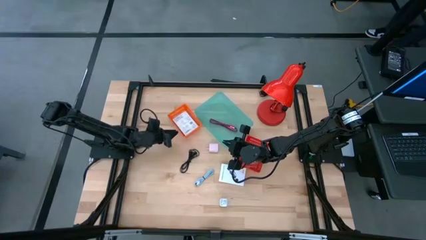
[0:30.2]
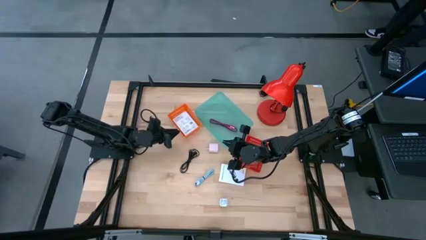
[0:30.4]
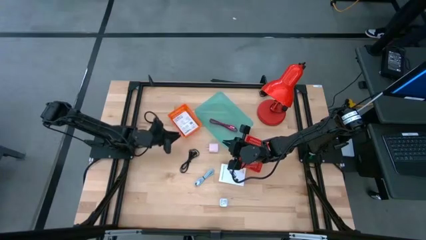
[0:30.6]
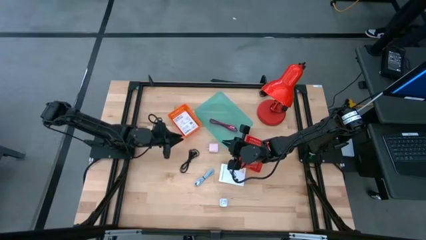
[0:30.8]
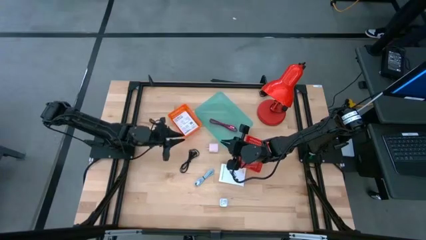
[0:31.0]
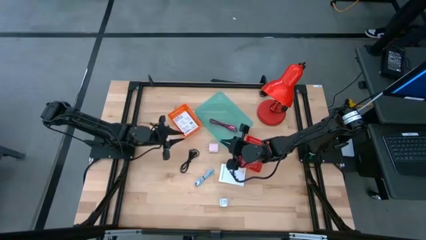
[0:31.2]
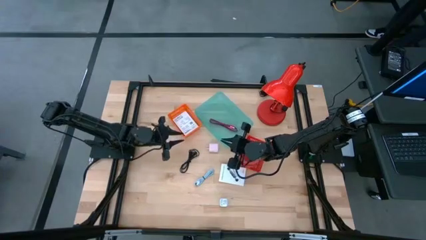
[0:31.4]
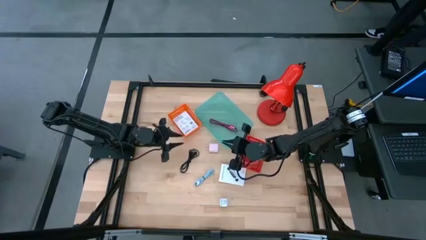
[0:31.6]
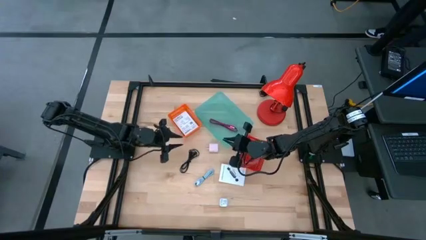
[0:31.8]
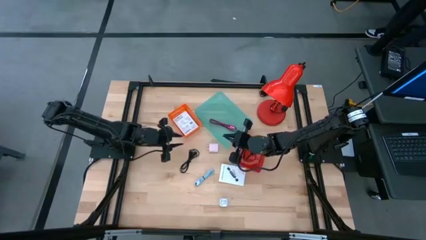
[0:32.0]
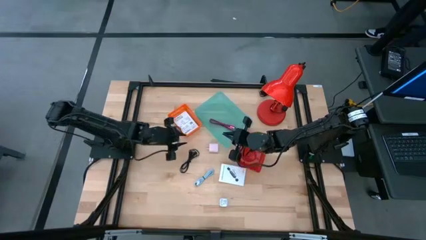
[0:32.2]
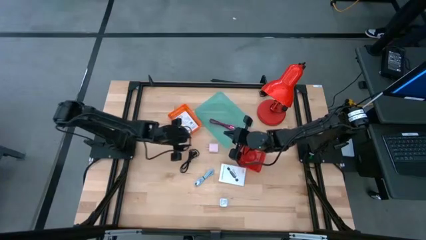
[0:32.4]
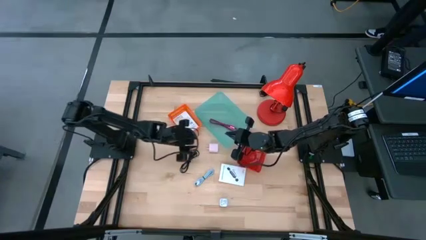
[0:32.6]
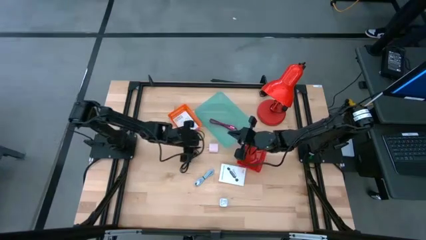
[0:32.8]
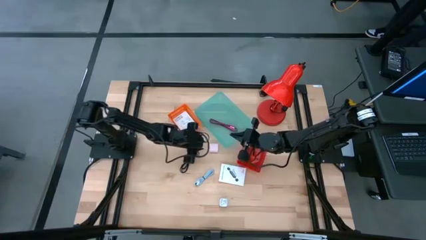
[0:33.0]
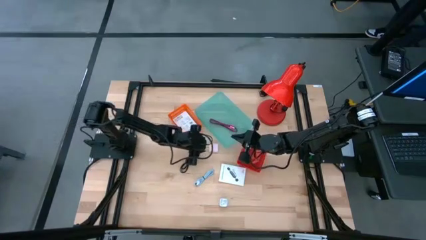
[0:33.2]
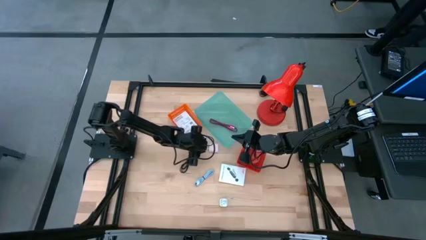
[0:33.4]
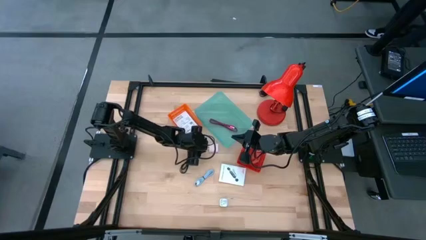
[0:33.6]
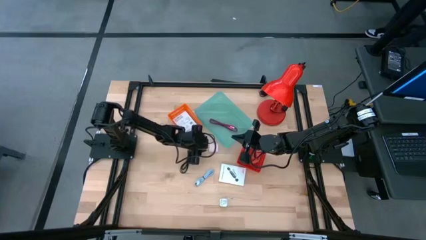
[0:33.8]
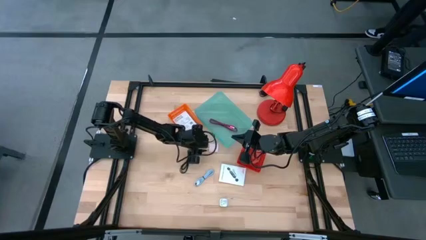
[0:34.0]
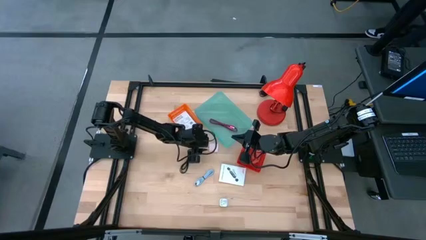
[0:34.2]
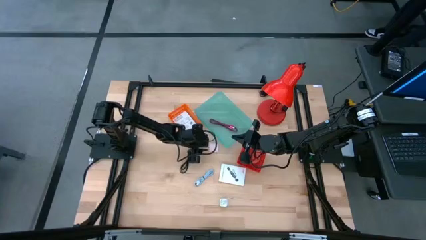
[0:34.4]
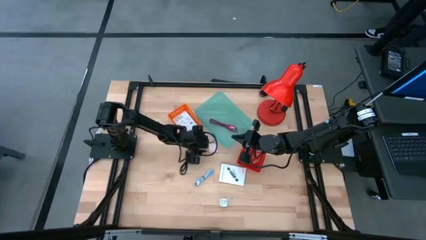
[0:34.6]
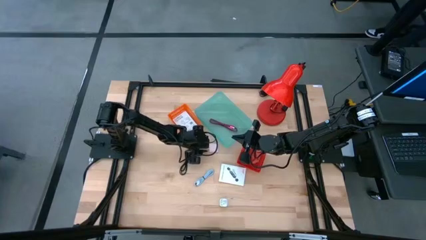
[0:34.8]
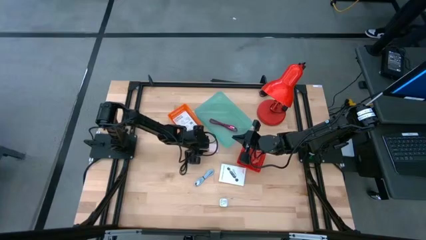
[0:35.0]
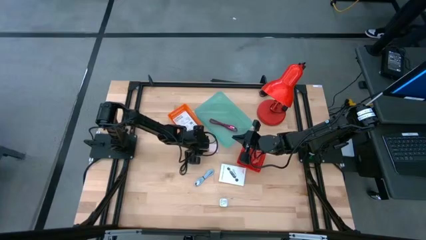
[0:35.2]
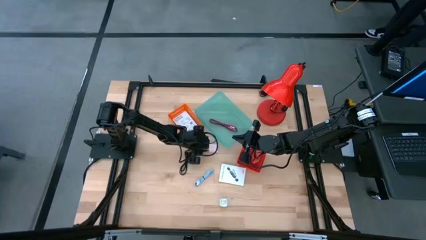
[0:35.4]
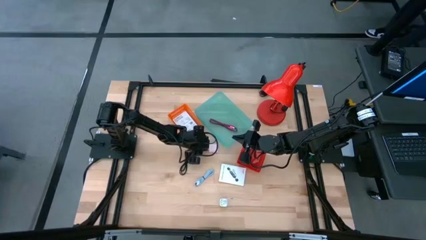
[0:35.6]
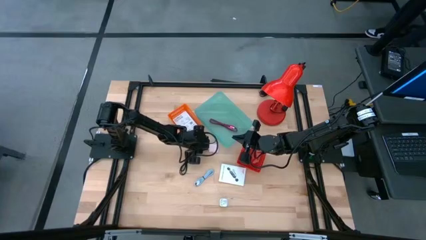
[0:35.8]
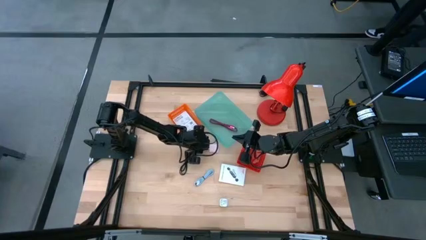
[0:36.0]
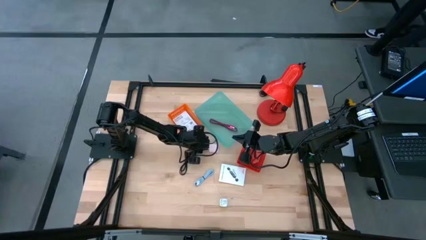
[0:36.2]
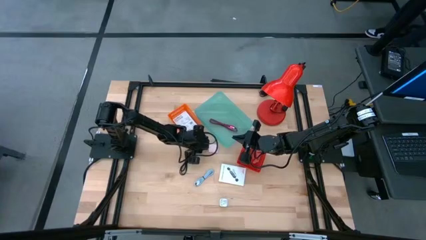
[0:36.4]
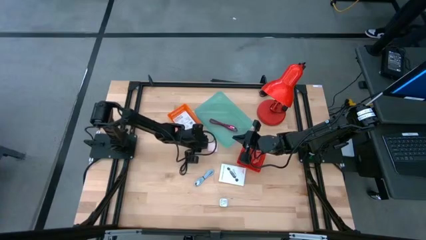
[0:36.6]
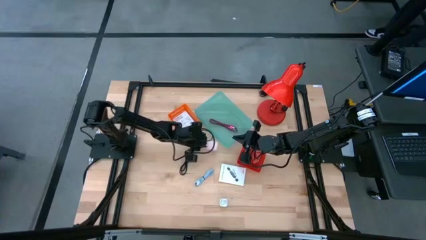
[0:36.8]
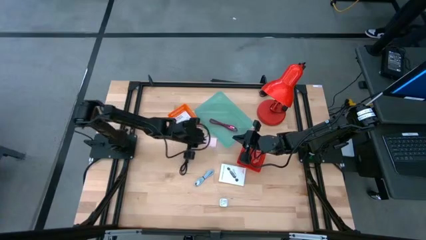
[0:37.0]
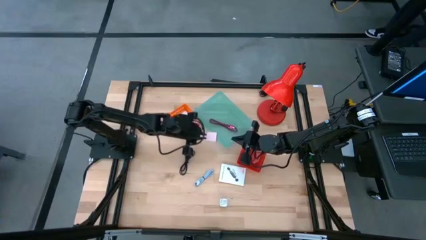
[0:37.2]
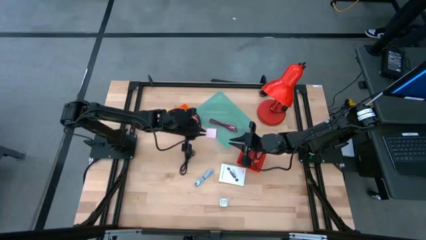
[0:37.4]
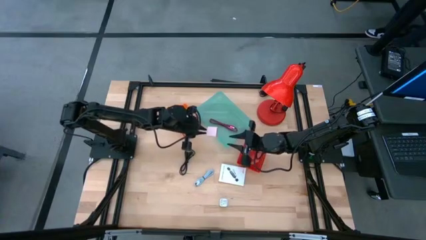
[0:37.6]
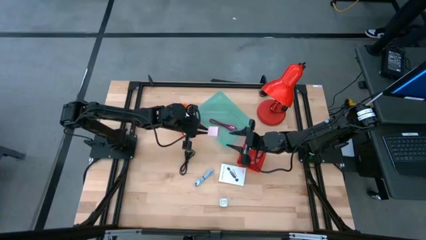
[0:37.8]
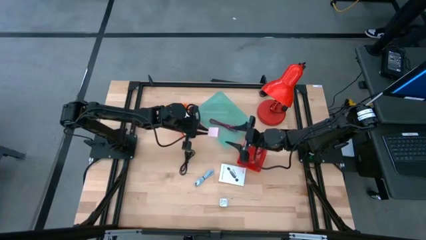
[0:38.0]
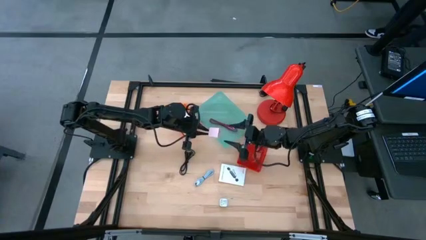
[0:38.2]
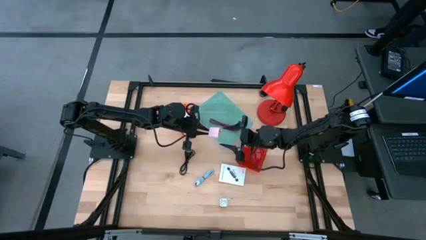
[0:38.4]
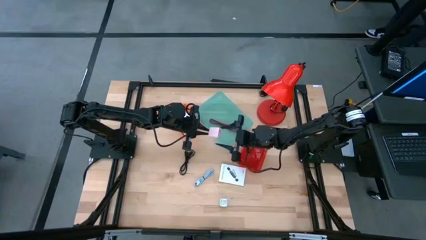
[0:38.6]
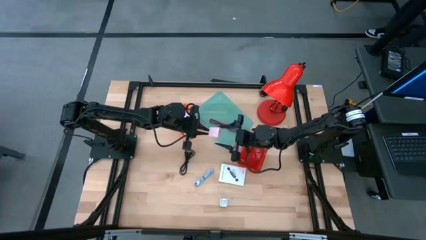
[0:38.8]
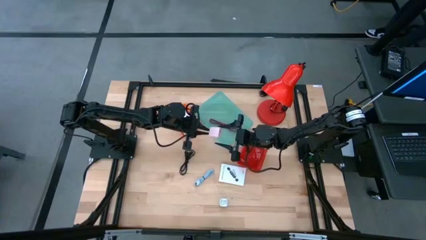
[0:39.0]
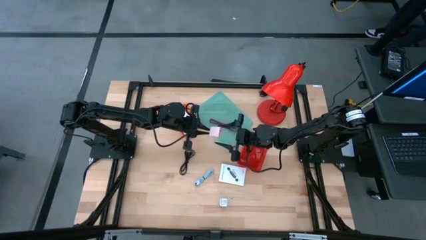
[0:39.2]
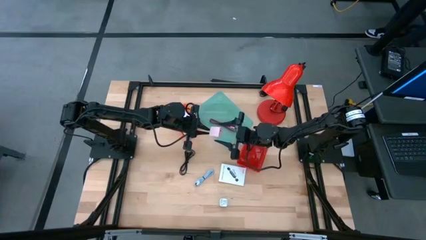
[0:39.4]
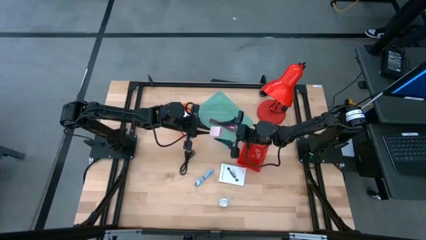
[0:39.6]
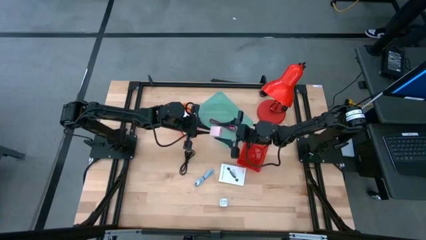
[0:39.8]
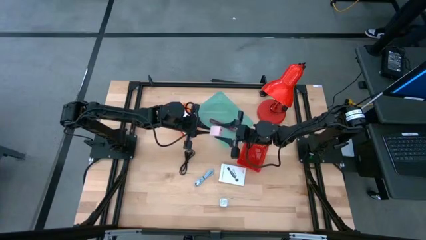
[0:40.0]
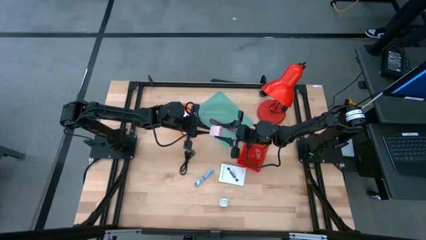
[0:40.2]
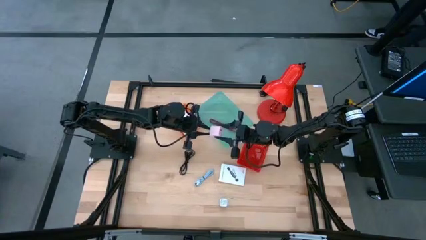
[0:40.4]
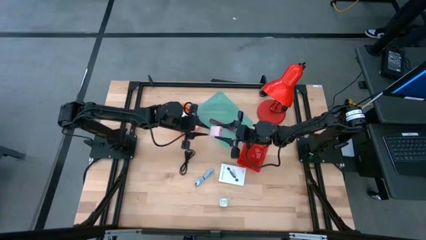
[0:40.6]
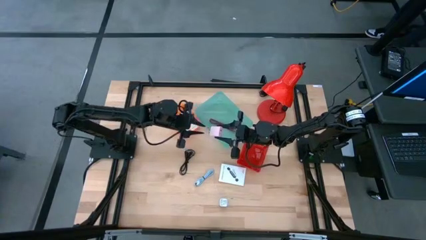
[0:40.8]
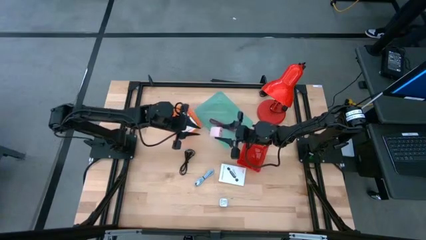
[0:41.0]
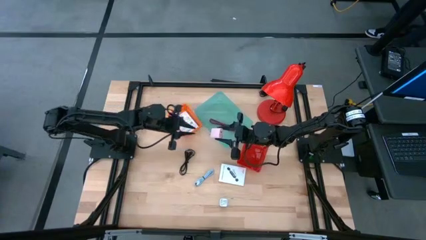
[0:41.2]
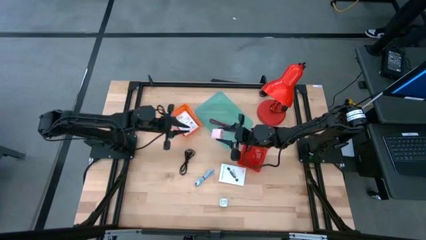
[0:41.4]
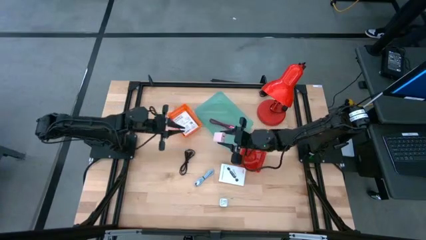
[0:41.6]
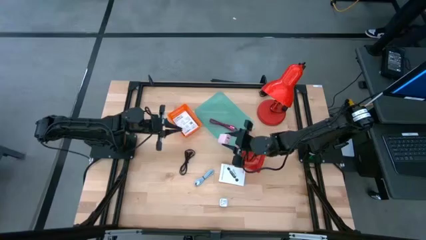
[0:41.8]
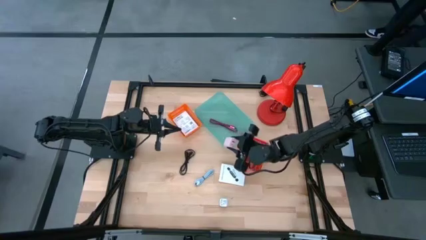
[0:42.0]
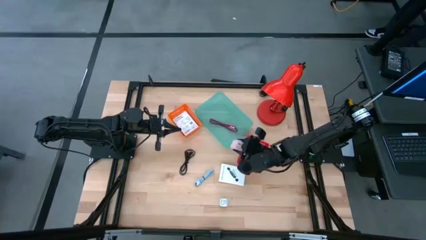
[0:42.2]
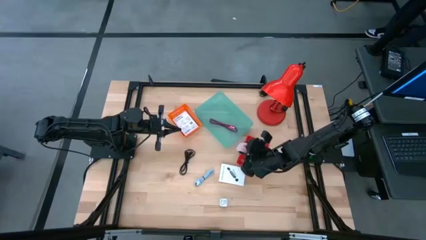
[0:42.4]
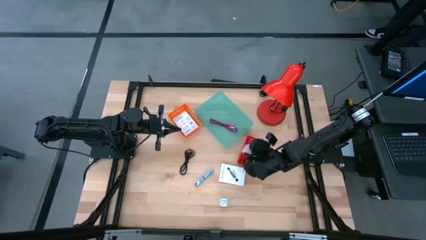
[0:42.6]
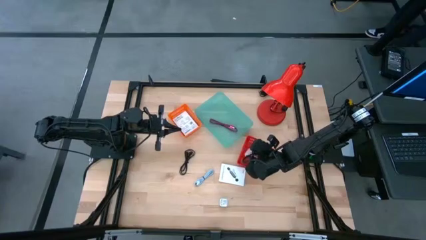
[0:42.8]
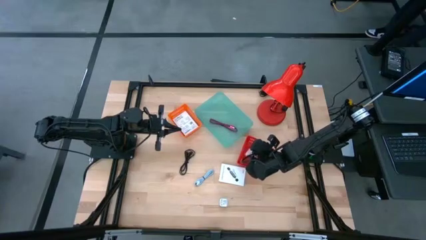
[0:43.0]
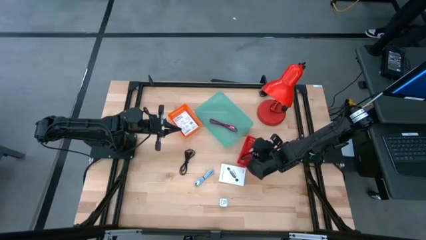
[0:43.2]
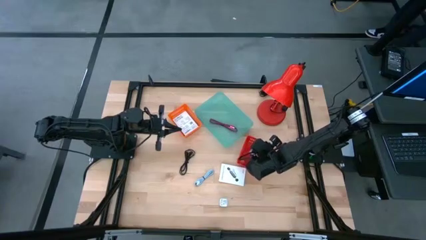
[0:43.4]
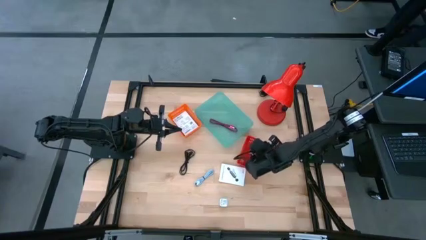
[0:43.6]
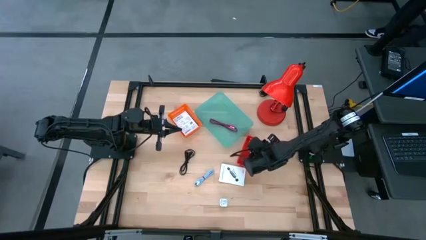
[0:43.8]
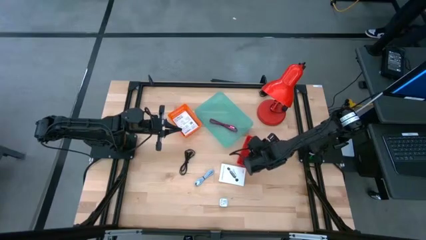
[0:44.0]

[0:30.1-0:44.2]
Task: Pick and place items into bin
Put the pink charger adapter into the red bin
